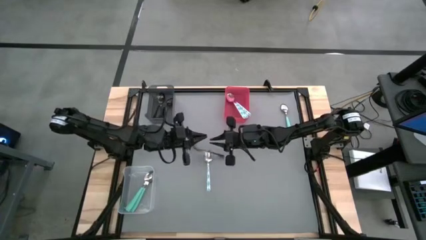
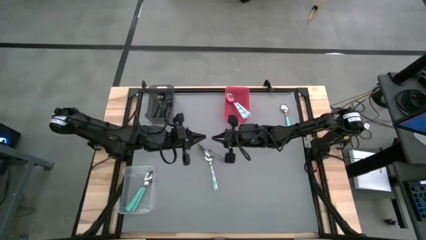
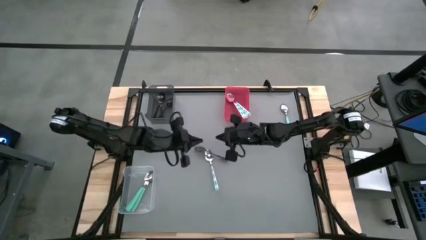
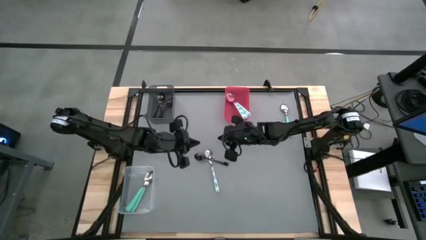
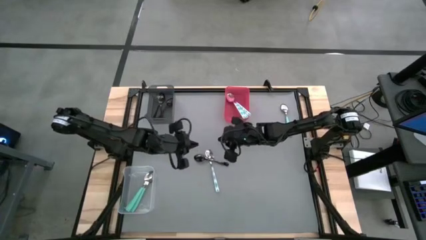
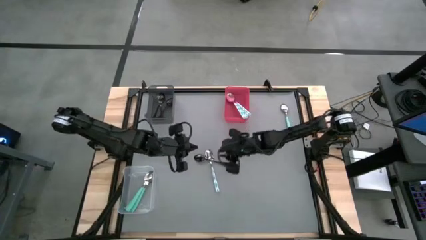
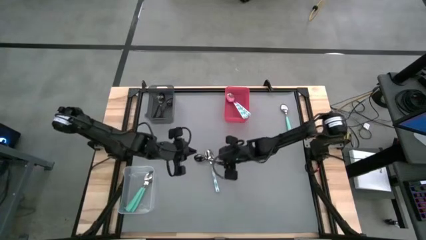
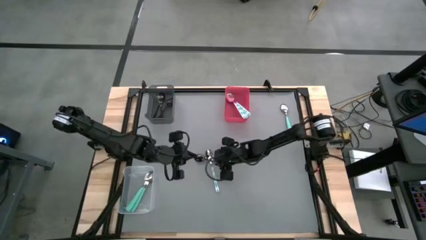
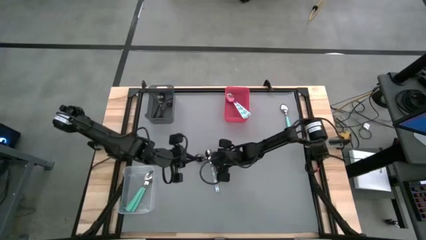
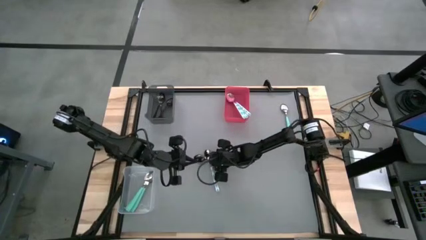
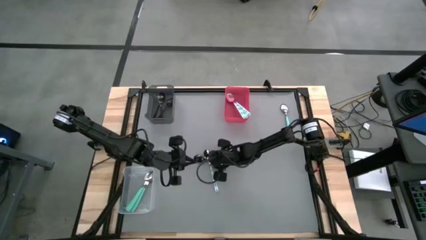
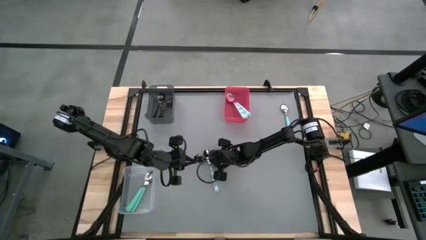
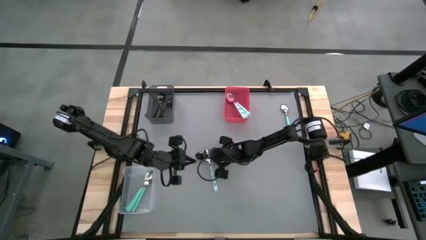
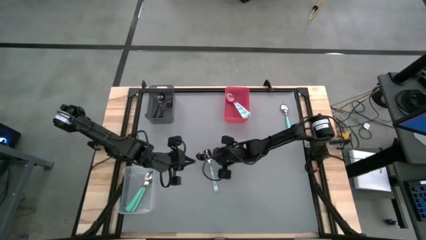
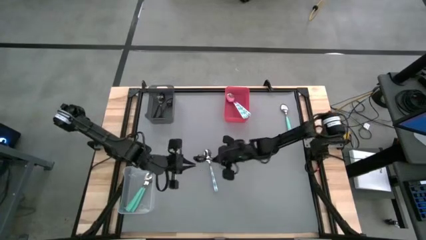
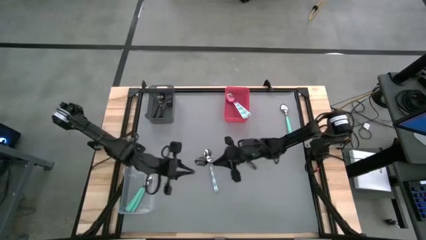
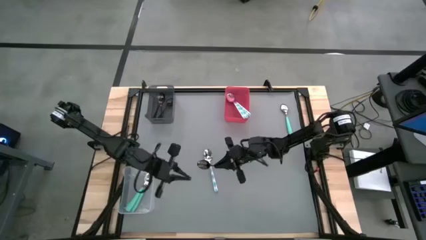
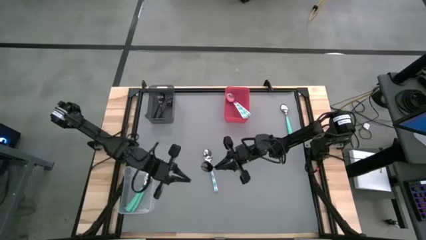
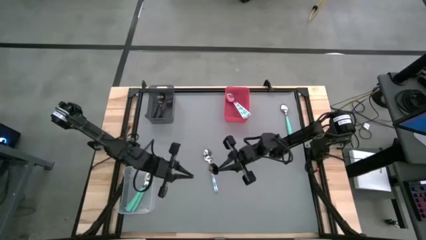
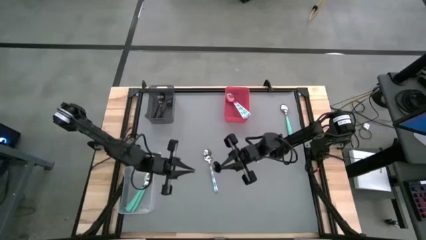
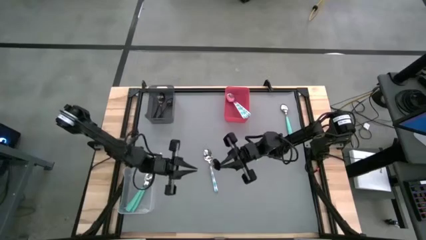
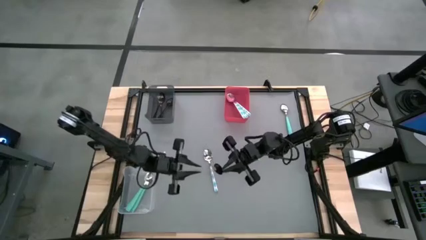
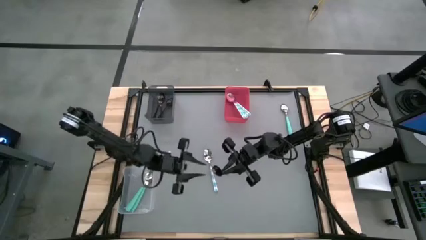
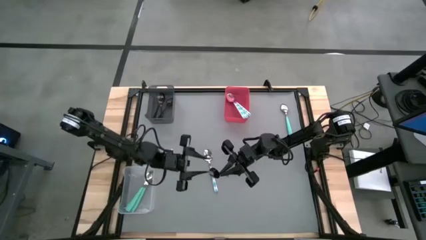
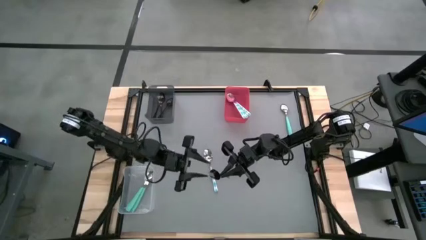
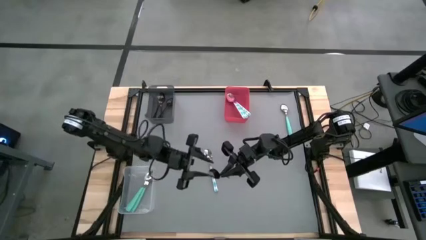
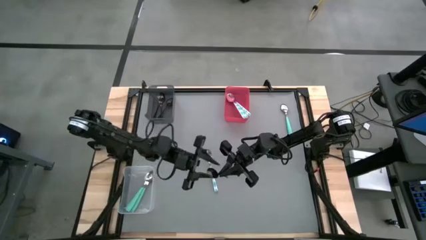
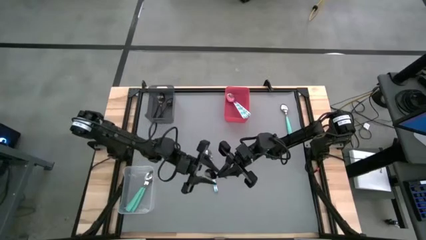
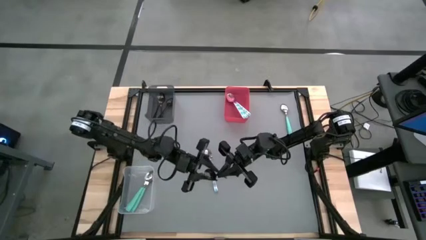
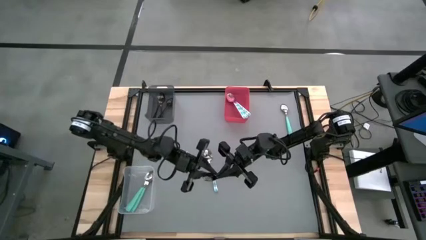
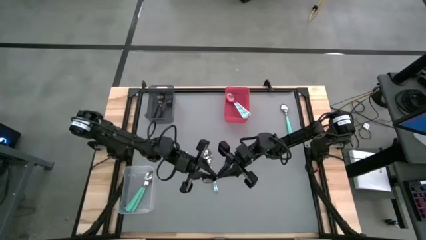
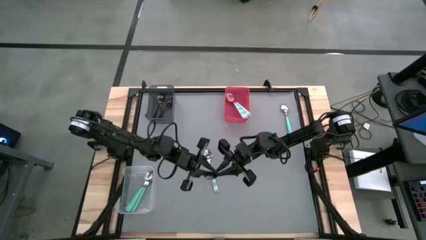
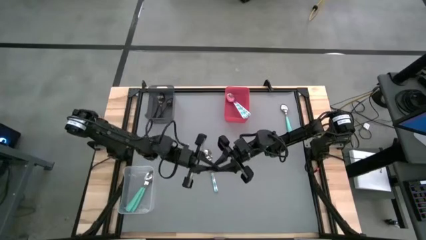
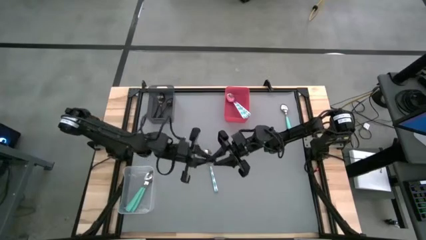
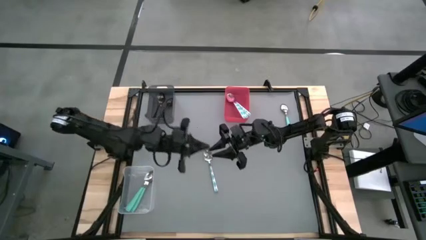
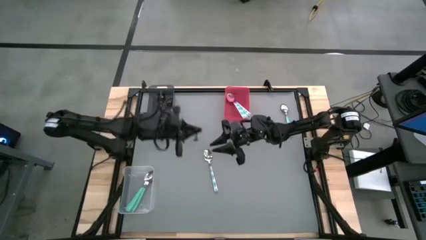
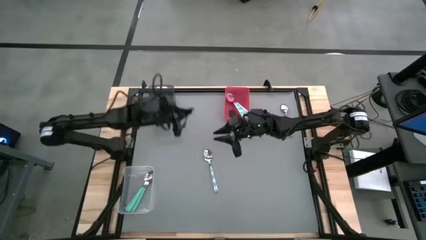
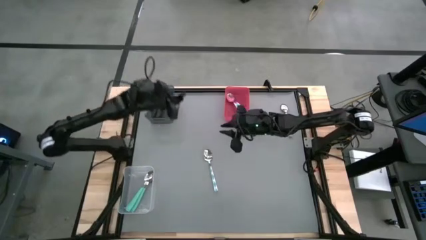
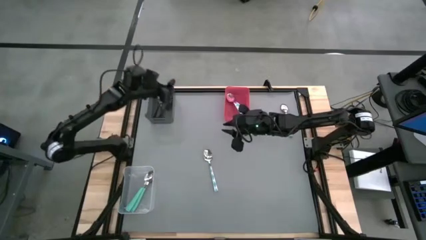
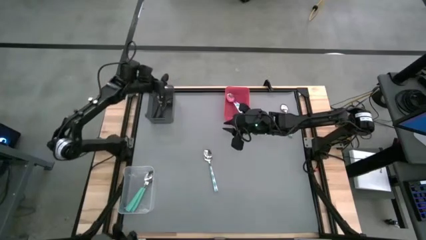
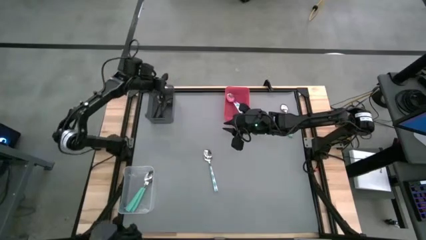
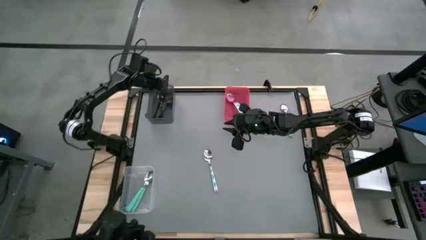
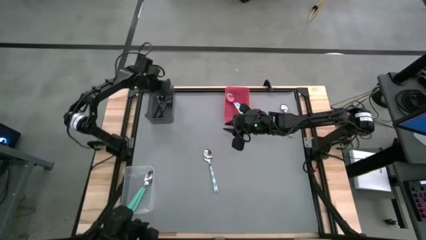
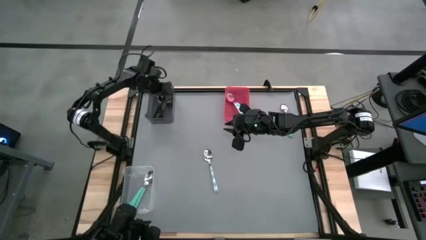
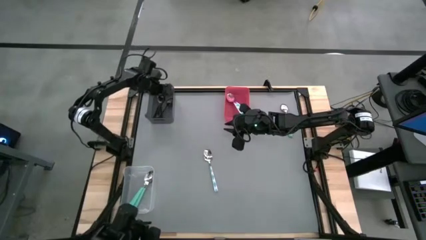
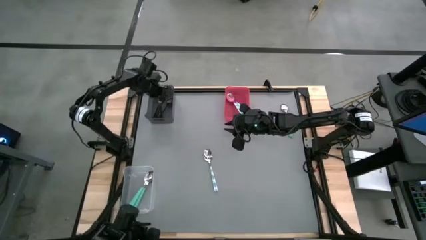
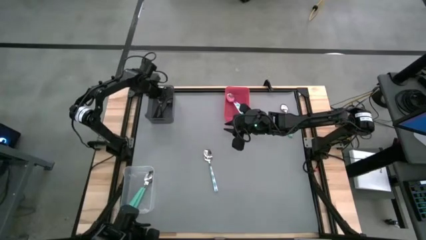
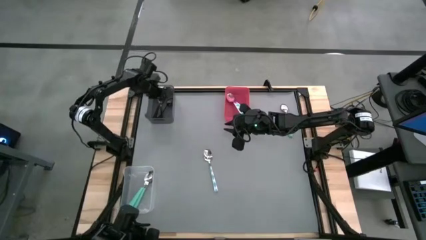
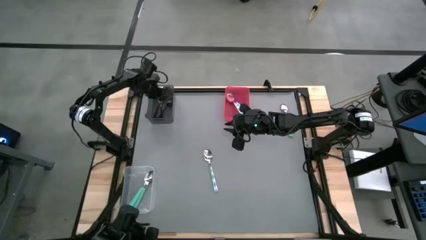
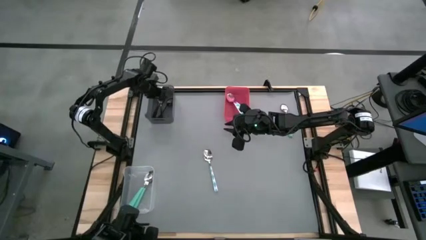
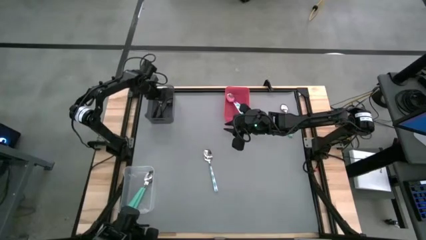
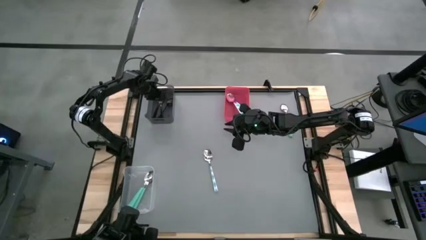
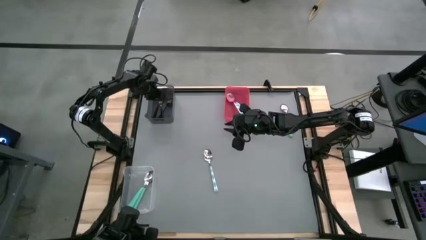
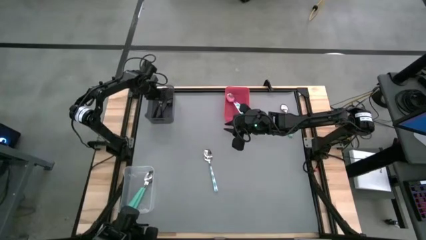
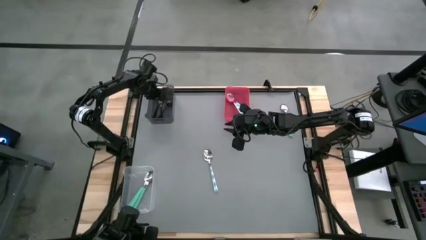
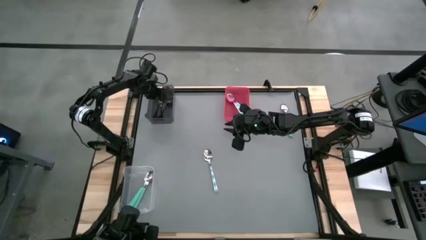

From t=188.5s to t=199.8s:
Task: Sort silverware by color (type)
Put the black spoon into the black bin

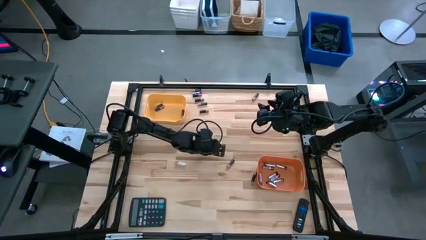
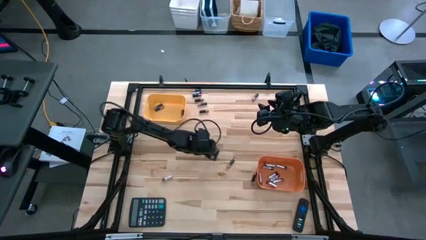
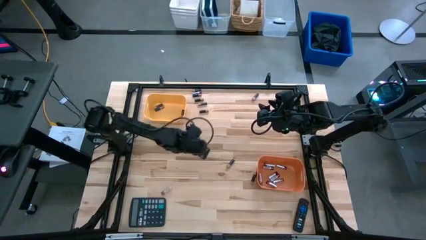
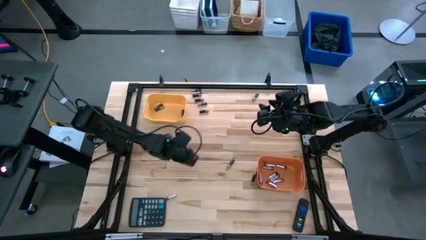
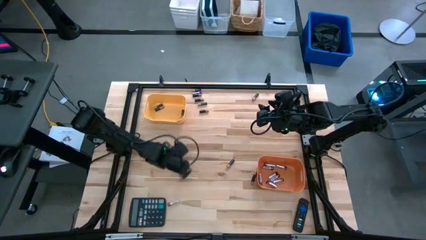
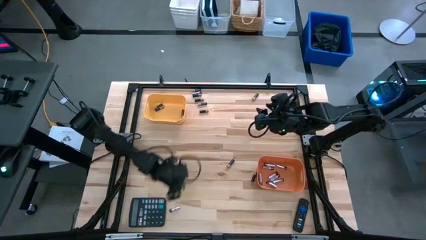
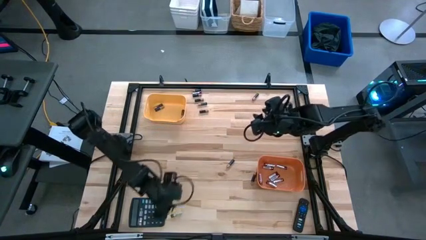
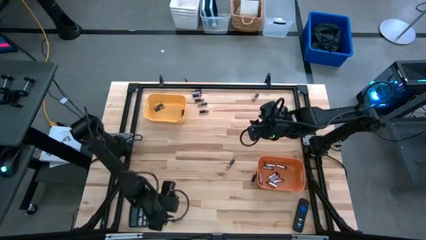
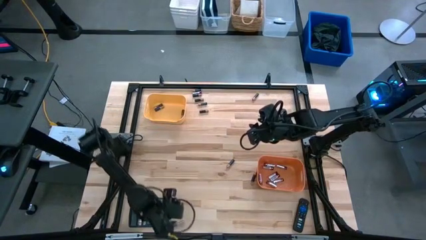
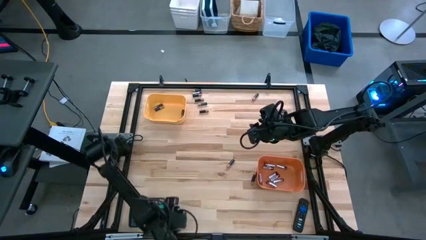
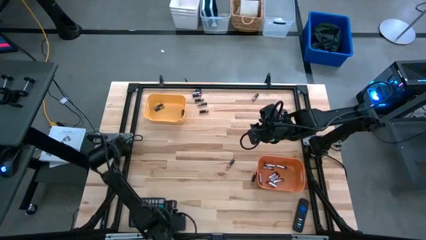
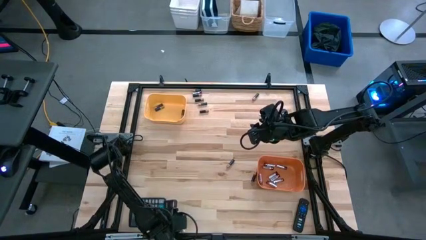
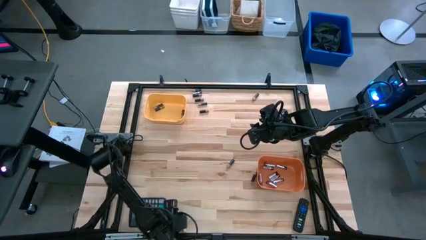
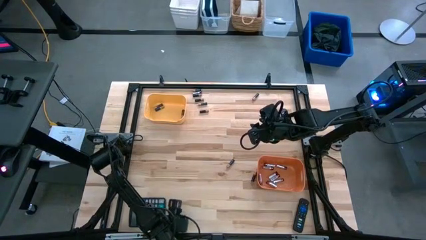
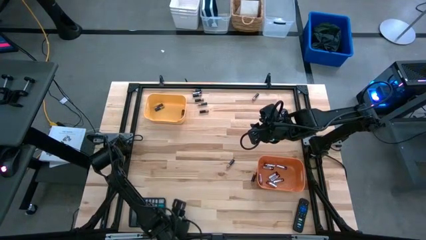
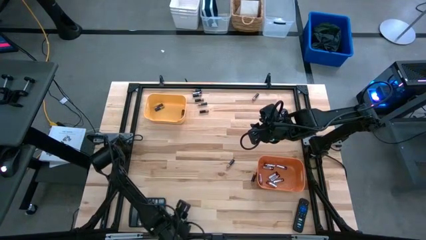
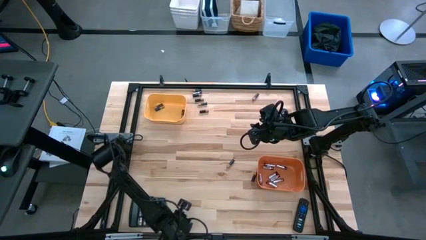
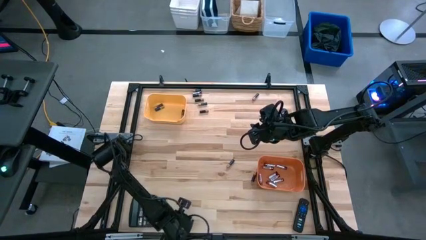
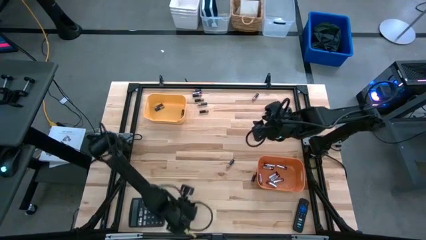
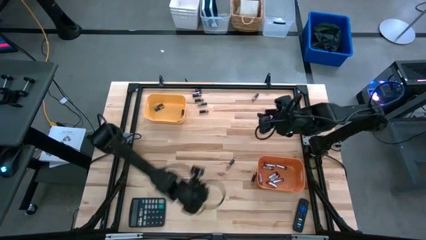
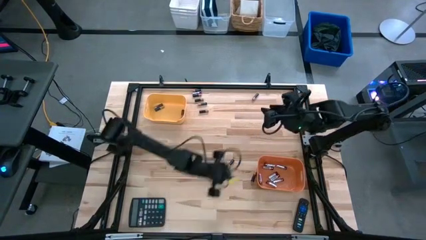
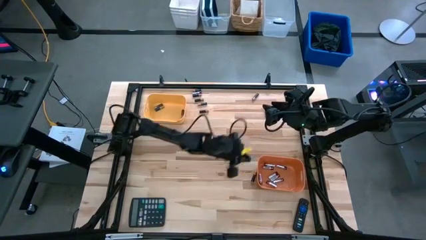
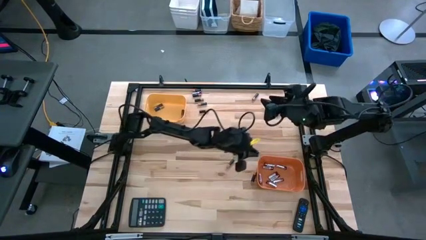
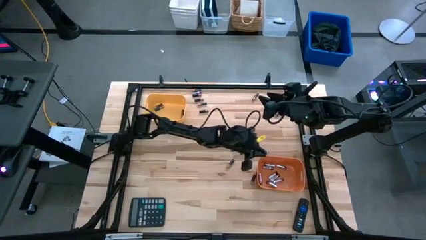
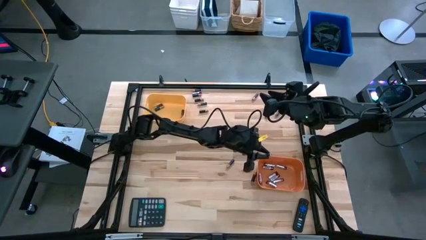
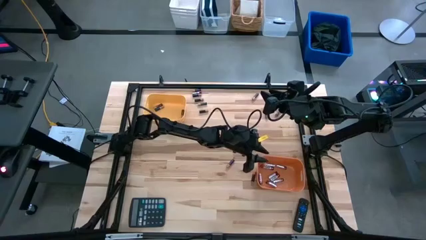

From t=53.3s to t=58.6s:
Task: Sort batteries
Put the silver battery into the orange bin
